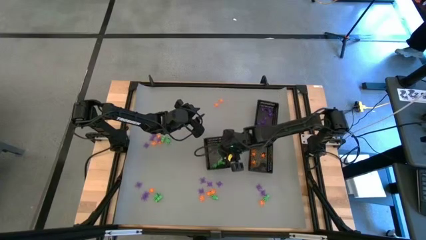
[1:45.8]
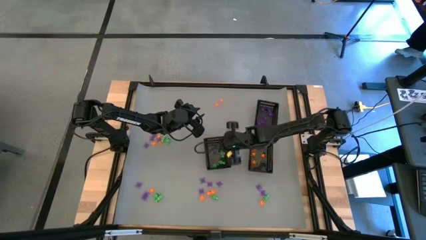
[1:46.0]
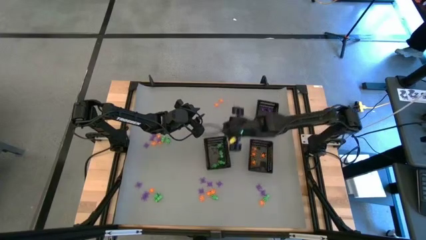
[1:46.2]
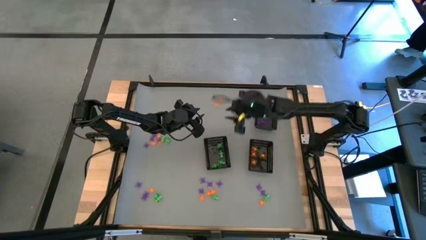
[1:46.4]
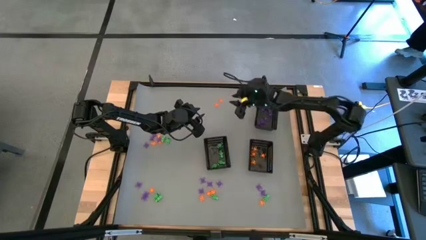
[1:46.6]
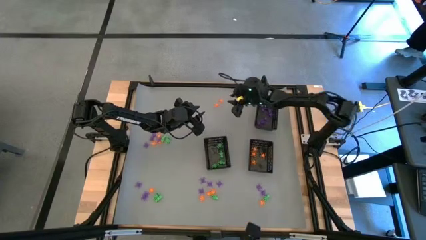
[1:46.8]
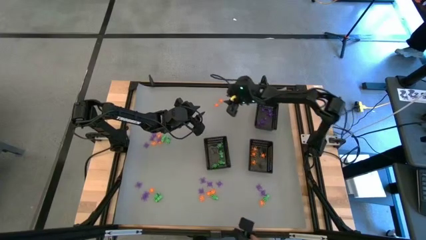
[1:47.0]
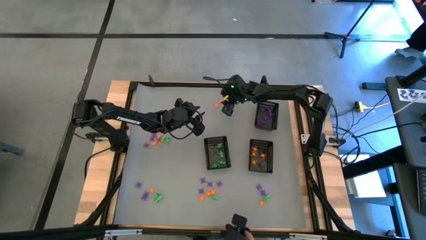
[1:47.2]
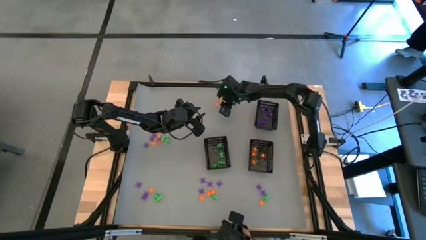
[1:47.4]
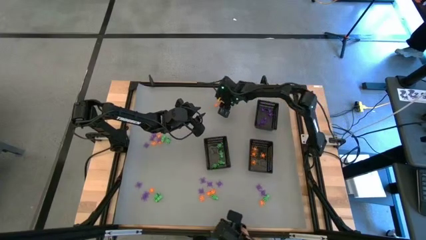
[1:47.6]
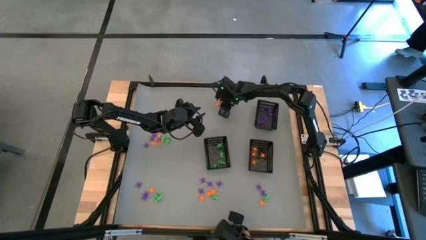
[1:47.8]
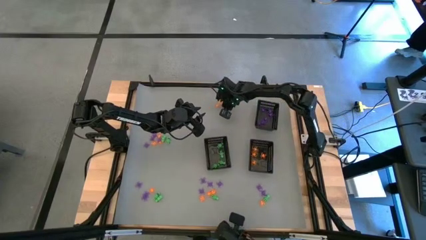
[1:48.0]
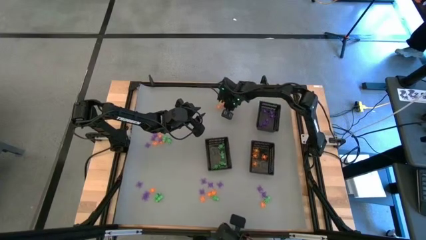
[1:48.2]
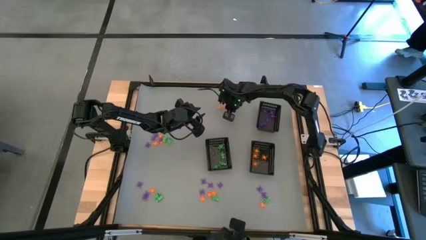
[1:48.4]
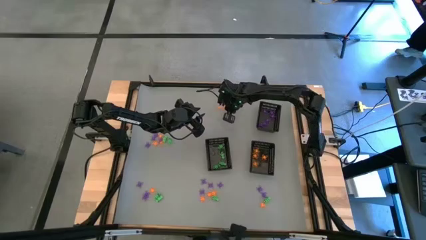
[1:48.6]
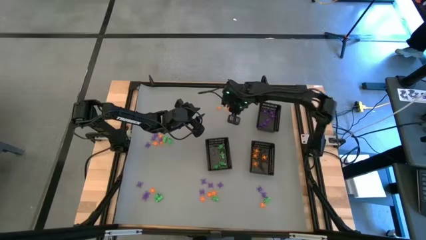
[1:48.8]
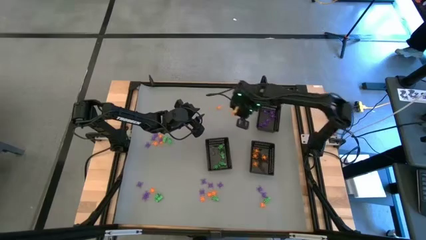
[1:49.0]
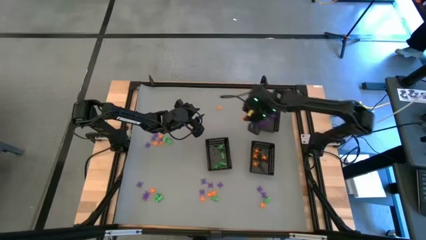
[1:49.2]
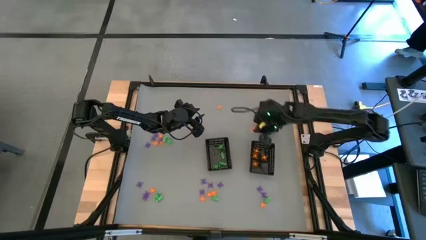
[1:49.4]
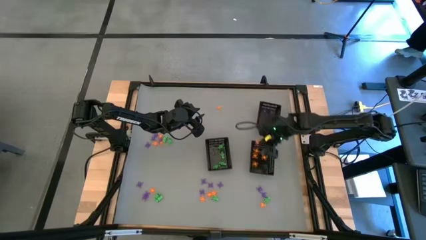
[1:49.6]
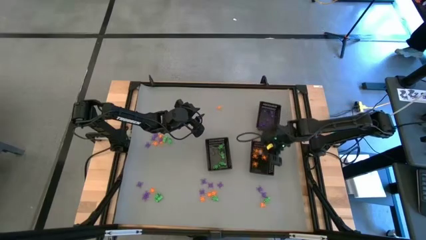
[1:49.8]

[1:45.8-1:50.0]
Task: Sort Halloween decoration
Put the orange spider toy into the bottom right bin

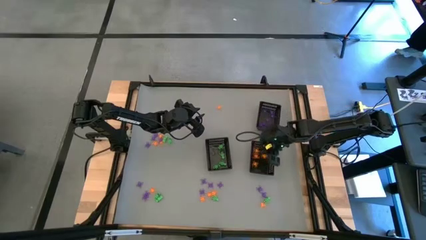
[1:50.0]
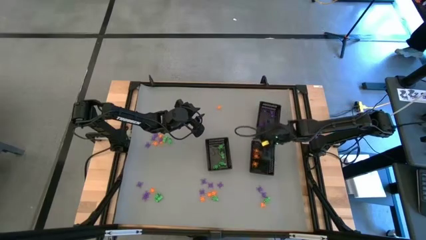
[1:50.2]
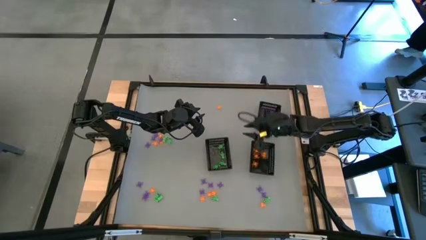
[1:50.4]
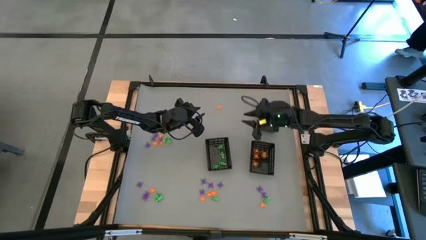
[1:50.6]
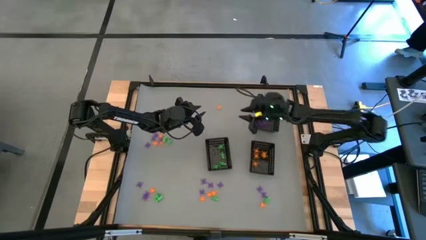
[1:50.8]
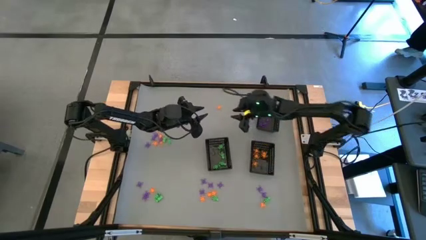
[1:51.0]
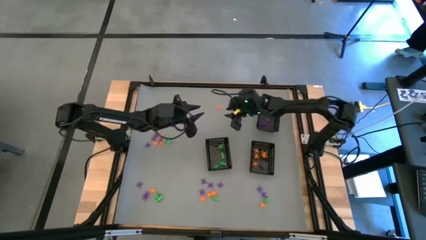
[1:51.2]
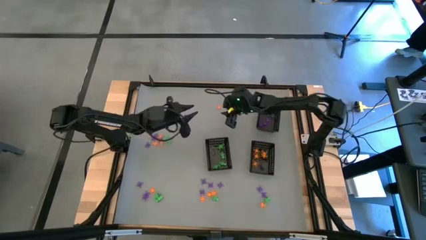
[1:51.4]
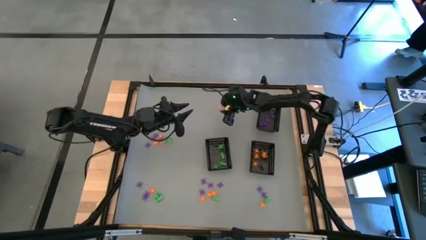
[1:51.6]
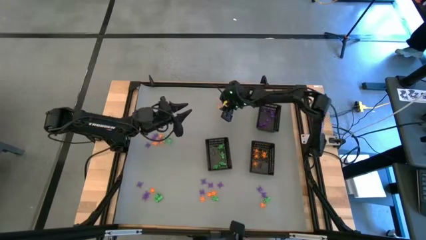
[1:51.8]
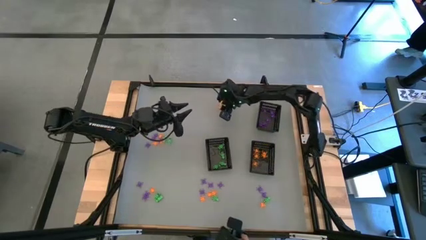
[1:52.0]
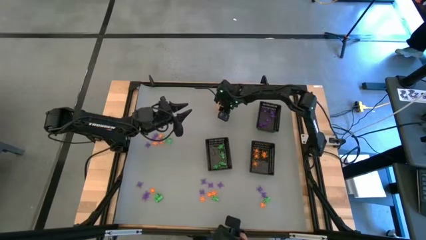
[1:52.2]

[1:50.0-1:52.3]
Put the orange spider toy into the bottom right bin

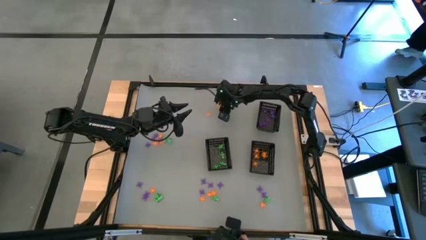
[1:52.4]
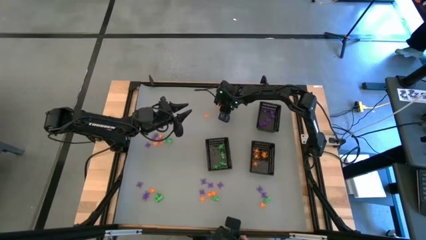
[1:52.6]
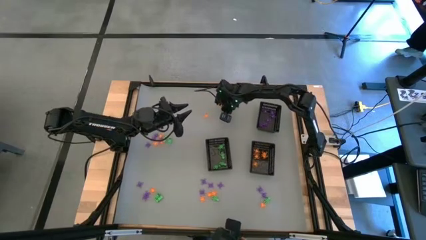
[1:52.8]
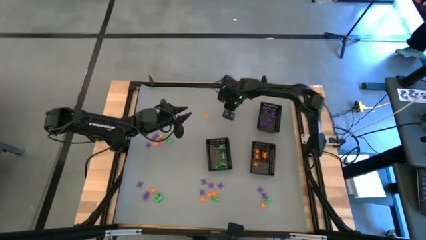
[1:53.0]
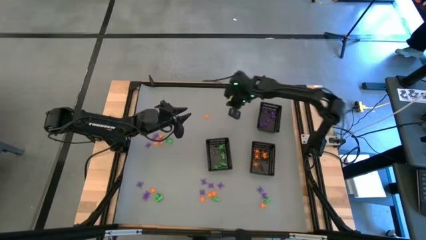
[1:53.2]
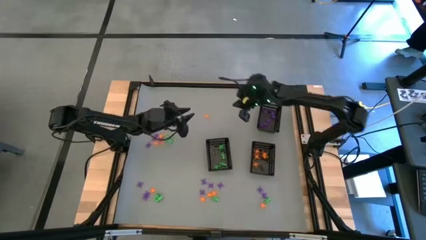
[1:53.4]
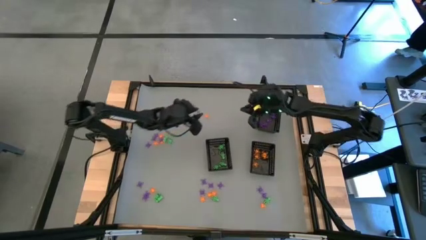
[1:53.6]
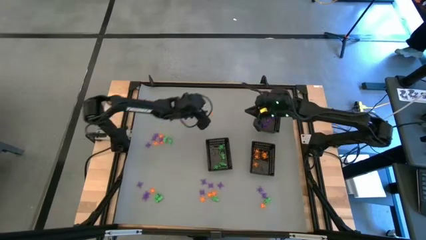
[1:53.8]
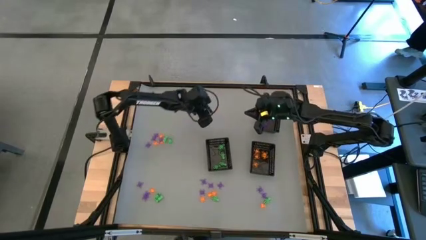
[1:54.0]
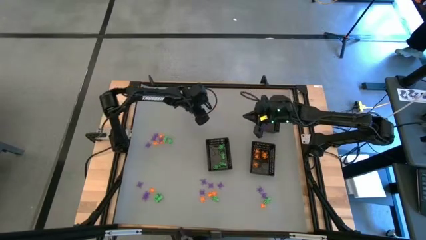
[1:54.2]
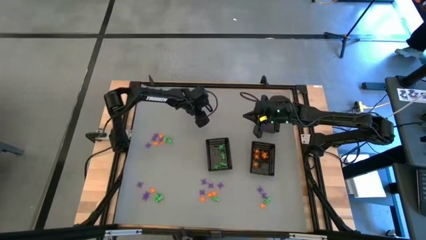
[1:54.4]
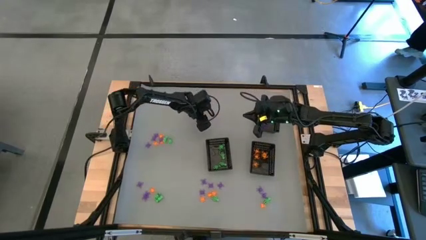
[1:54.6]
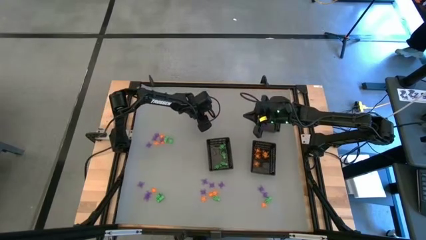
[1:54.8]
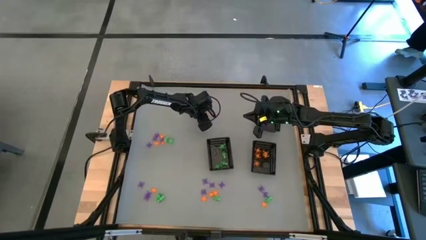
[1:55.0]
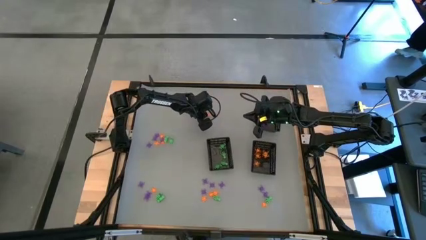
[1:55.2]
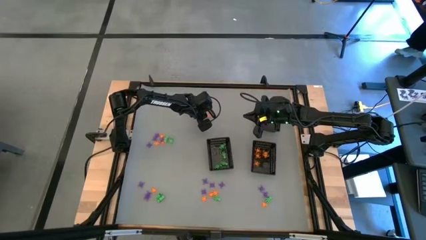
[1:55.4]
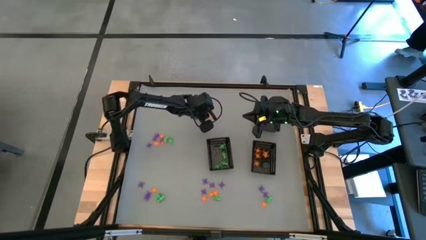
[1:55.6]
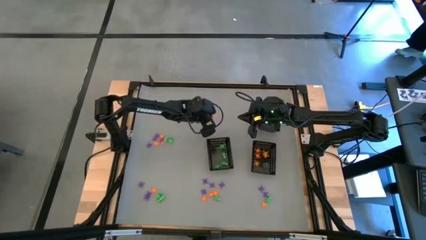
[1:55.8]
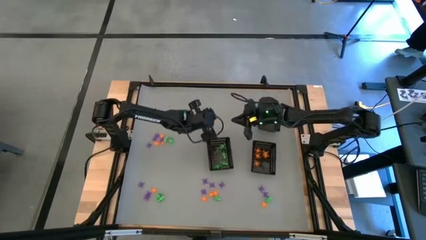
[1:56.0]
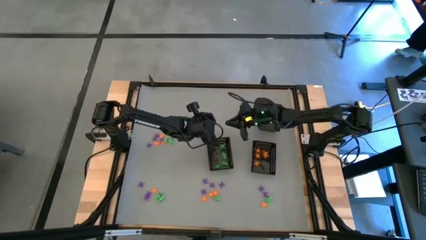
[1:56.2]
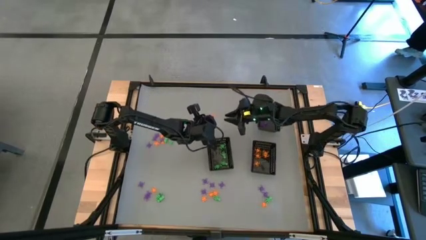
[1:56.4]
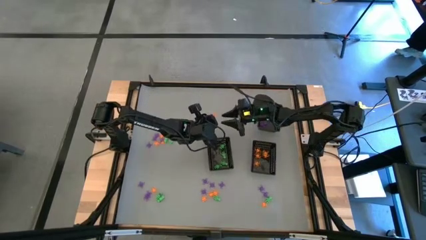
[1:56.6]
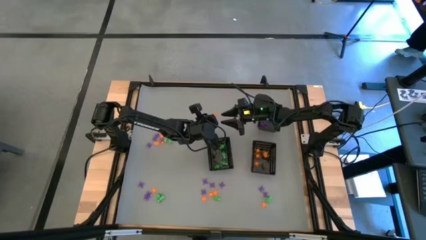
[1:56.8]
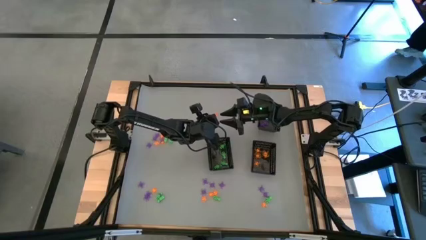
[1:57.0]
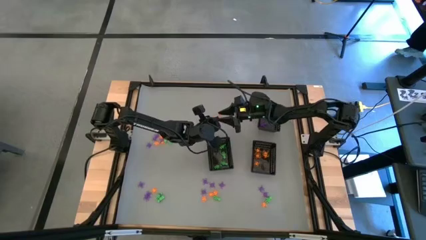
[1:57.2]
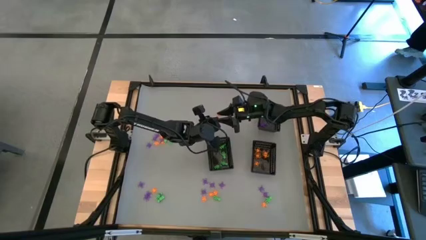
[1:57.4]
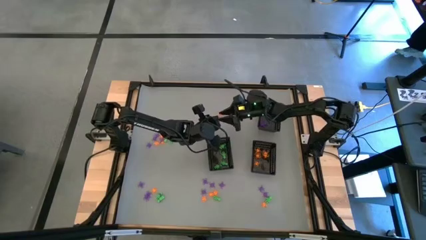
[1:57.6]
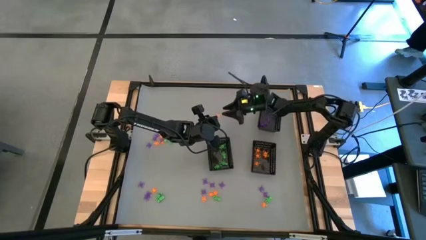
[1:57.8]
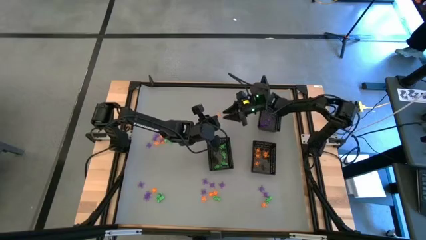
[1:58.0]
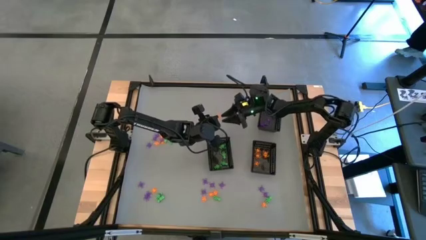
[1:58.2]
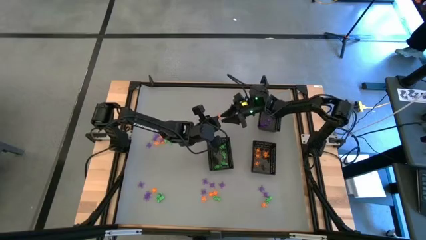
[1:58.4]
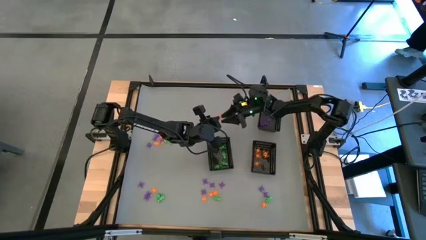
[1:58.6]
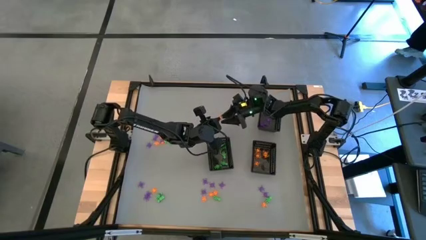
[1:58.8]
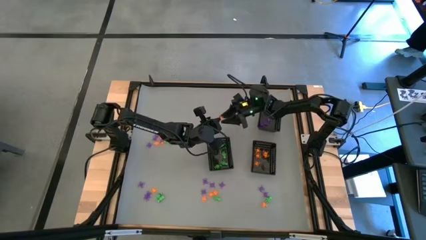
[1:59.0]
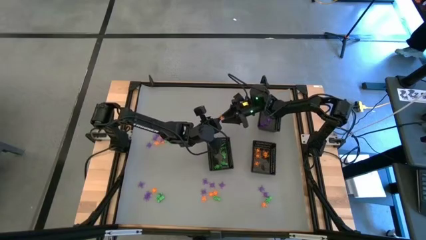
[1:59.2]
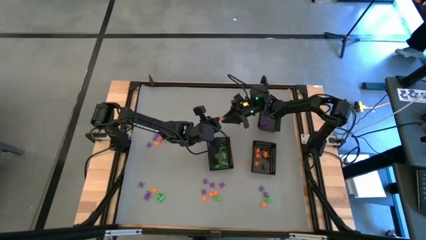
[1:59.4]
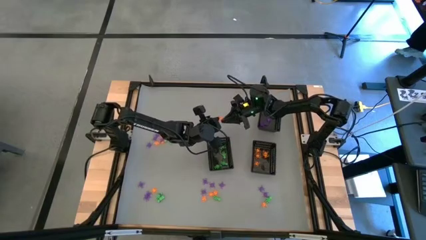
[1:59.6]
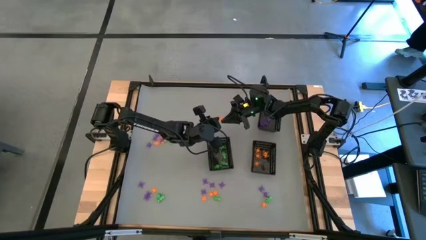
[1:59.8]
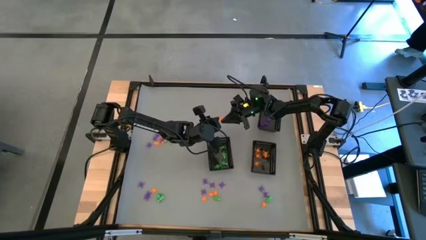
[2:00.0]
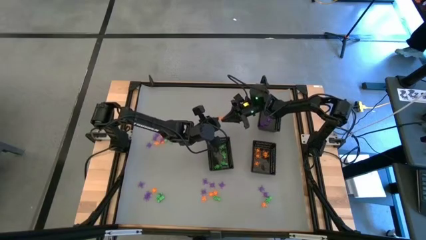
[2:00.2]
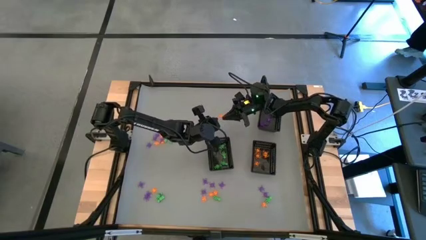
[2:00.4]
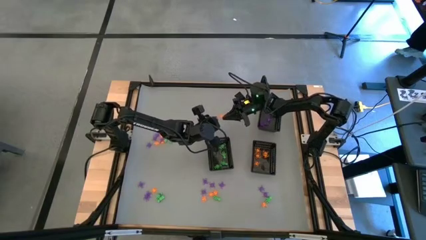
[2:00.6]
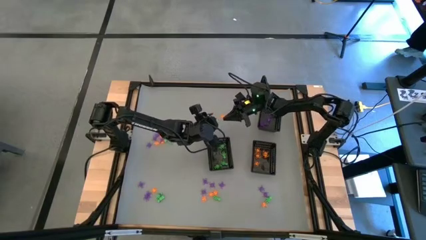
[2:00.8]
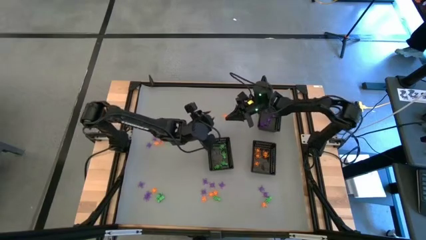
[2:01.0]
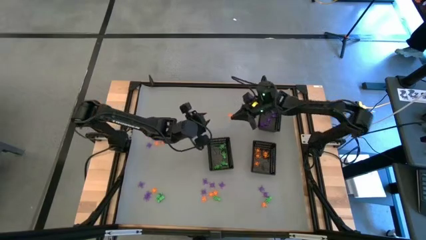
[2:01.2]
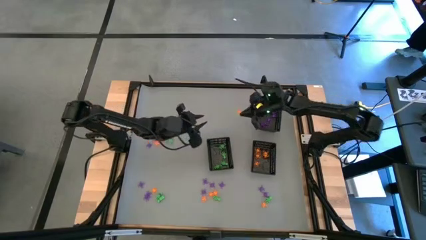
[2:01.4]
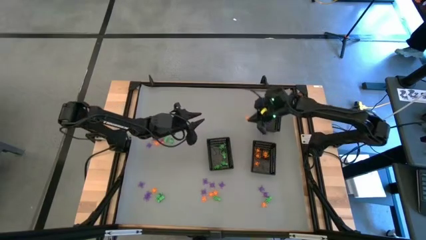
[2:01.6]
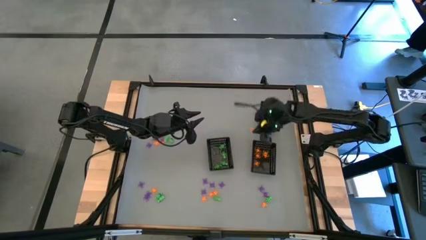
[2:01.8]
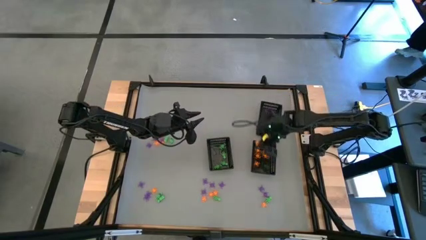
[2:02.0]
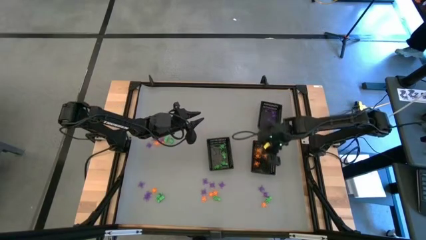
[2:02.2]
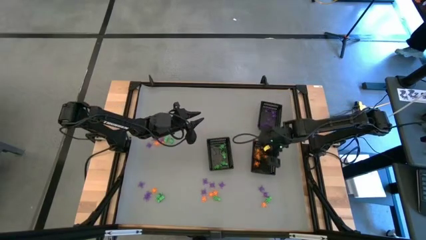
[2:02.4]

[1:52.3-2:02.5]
Put the orange spider toy into the bottom right bin
